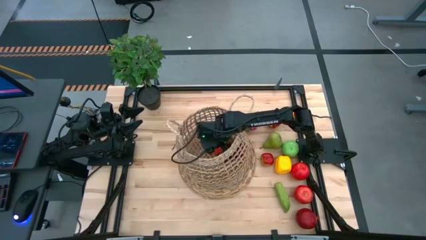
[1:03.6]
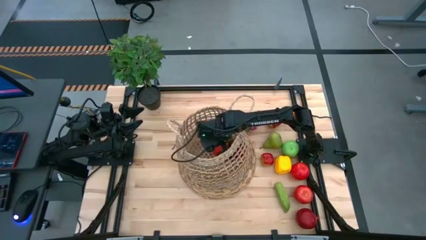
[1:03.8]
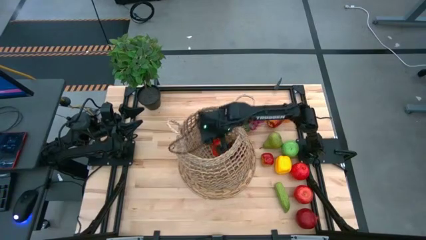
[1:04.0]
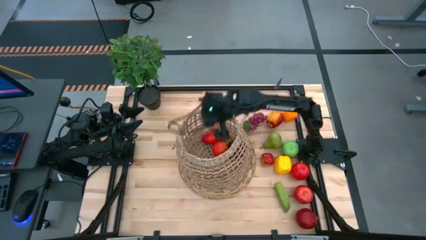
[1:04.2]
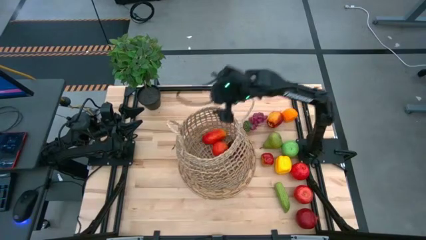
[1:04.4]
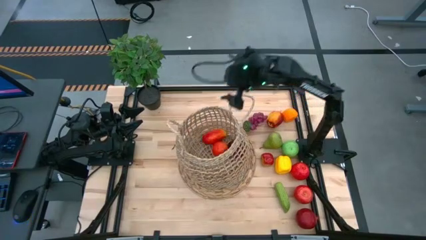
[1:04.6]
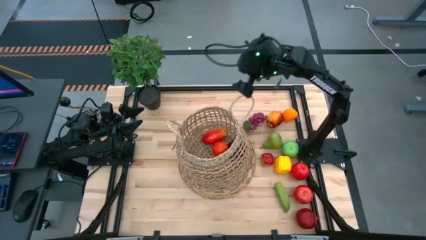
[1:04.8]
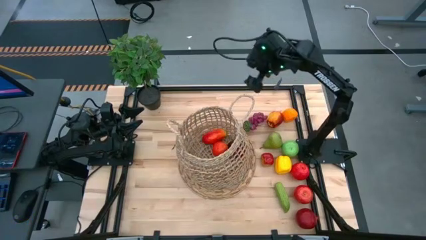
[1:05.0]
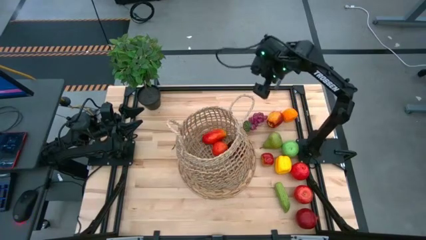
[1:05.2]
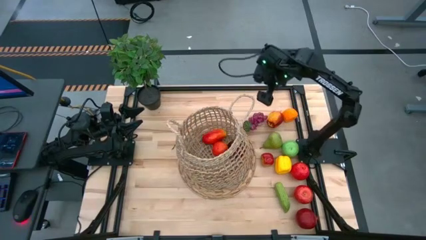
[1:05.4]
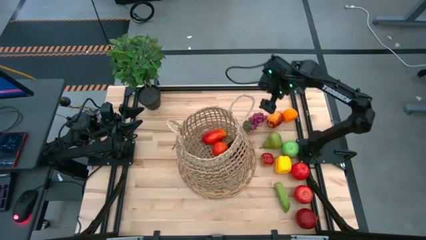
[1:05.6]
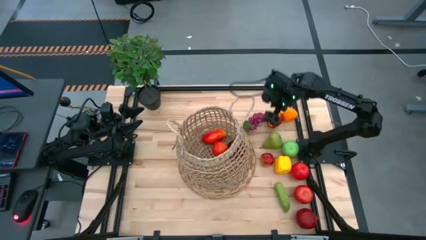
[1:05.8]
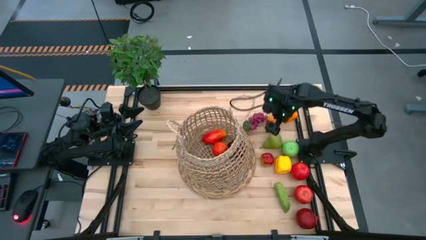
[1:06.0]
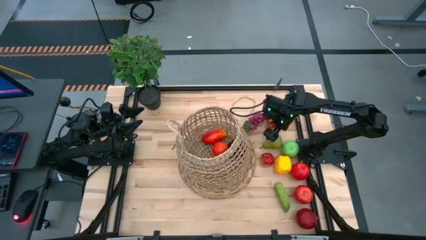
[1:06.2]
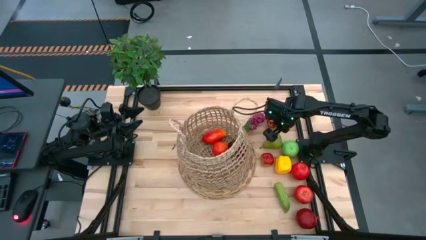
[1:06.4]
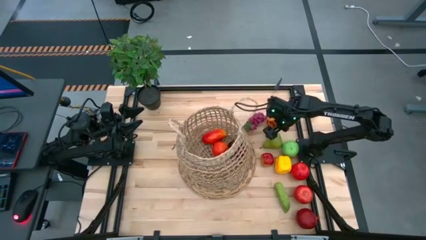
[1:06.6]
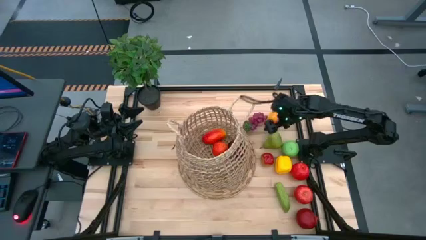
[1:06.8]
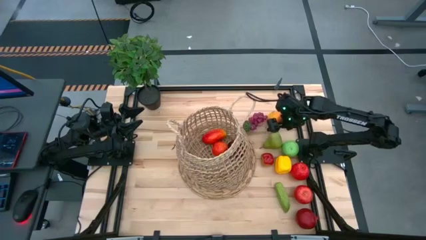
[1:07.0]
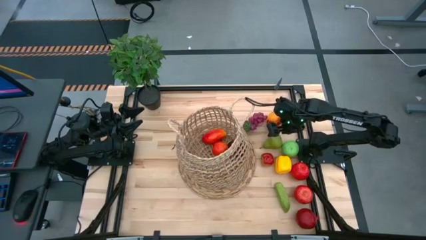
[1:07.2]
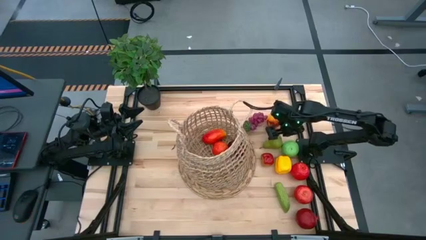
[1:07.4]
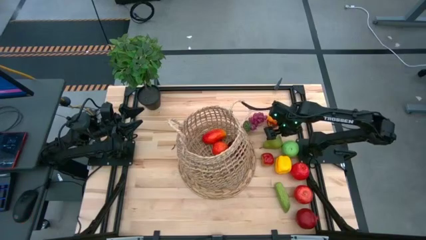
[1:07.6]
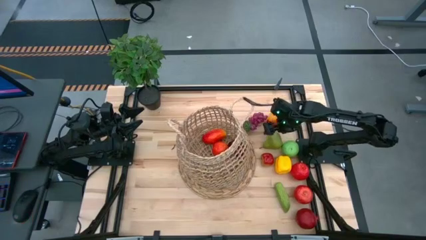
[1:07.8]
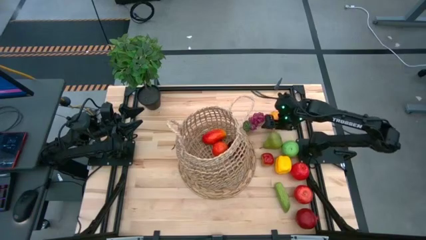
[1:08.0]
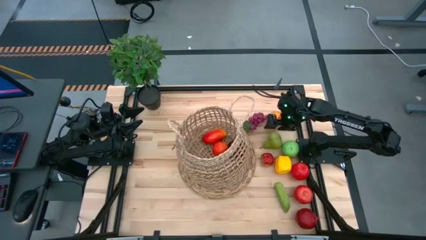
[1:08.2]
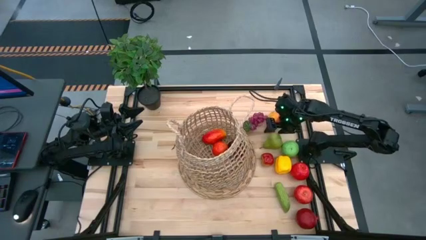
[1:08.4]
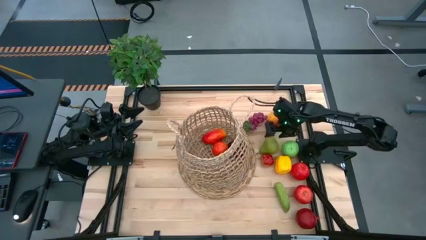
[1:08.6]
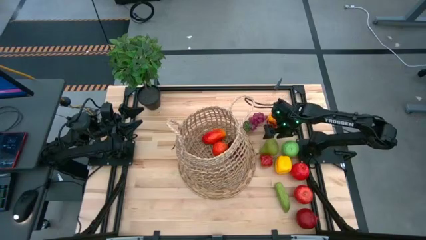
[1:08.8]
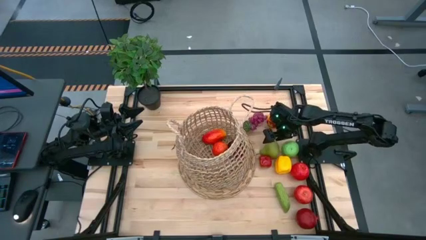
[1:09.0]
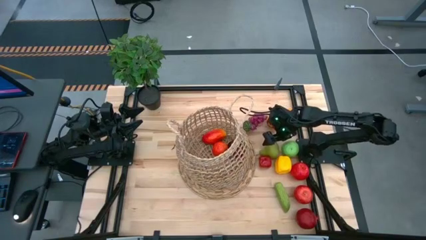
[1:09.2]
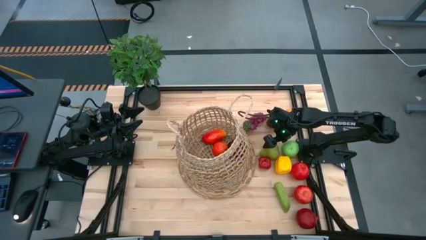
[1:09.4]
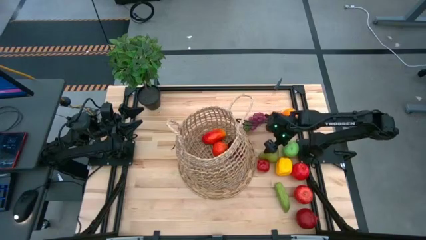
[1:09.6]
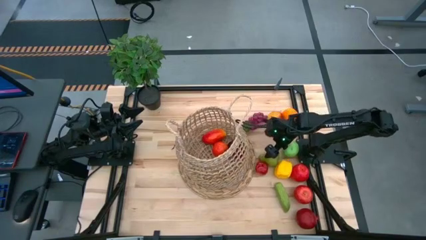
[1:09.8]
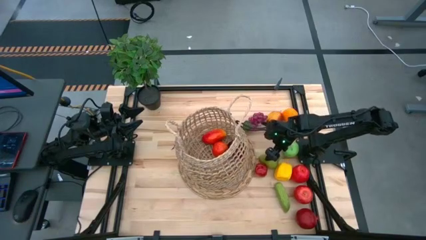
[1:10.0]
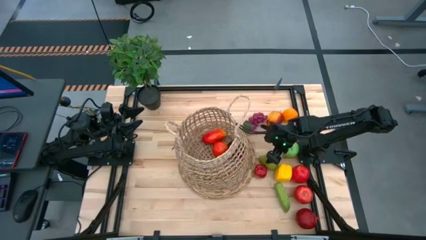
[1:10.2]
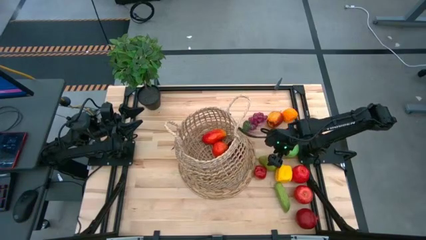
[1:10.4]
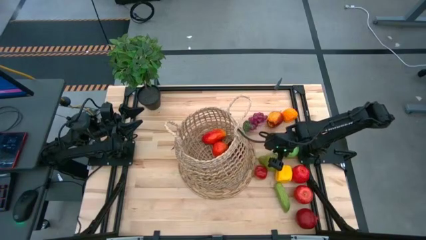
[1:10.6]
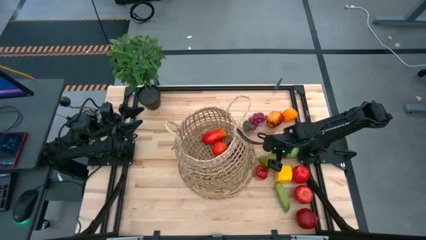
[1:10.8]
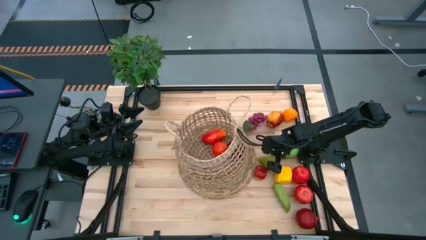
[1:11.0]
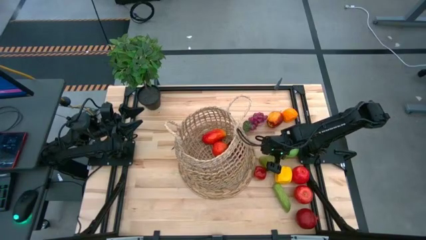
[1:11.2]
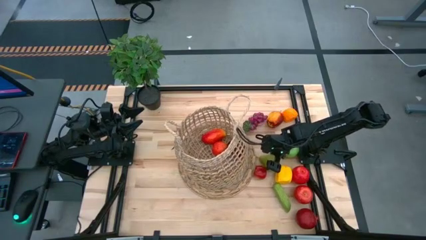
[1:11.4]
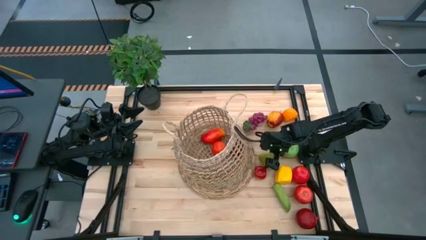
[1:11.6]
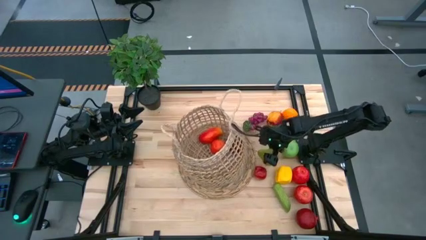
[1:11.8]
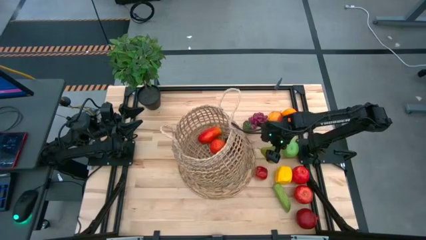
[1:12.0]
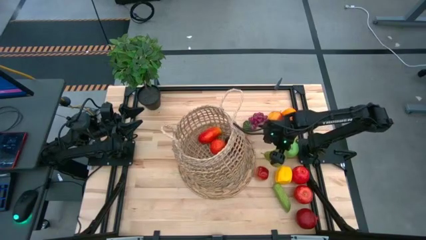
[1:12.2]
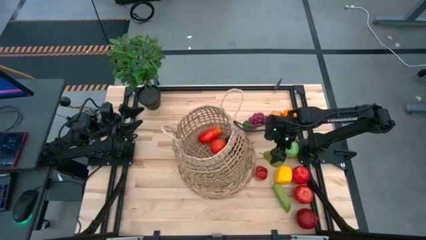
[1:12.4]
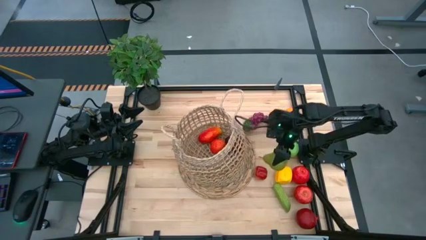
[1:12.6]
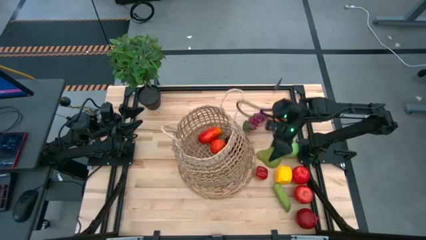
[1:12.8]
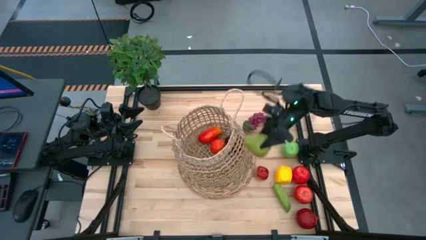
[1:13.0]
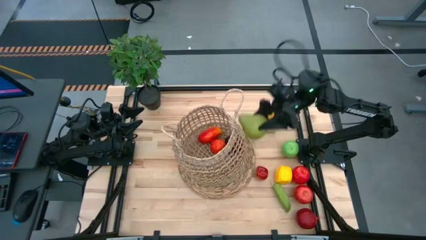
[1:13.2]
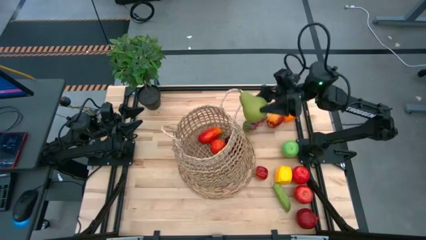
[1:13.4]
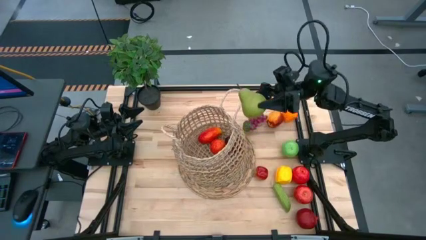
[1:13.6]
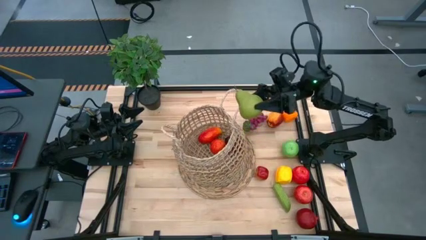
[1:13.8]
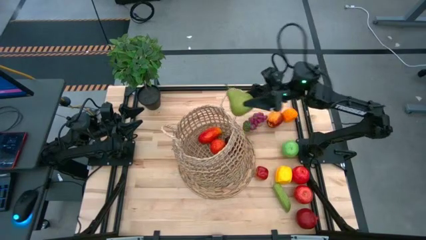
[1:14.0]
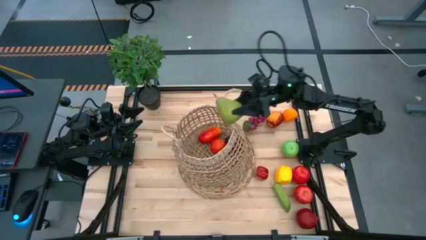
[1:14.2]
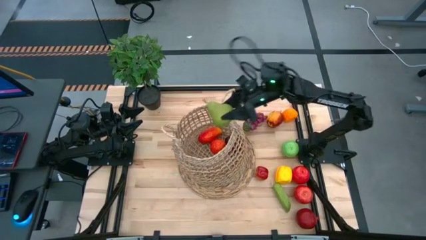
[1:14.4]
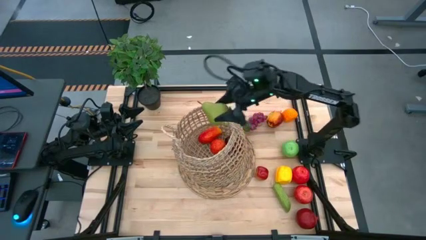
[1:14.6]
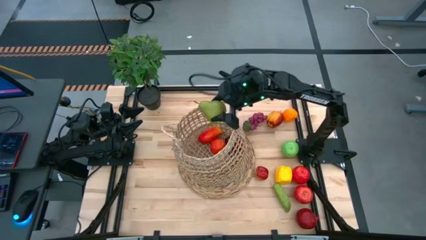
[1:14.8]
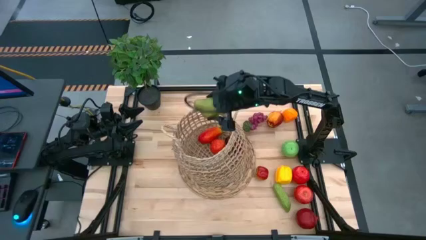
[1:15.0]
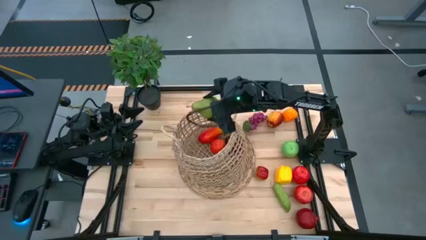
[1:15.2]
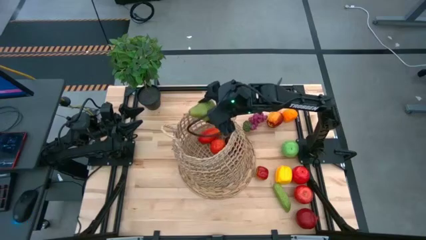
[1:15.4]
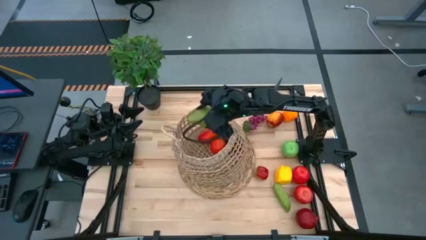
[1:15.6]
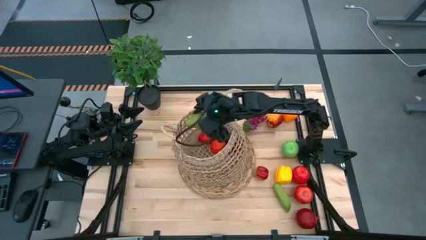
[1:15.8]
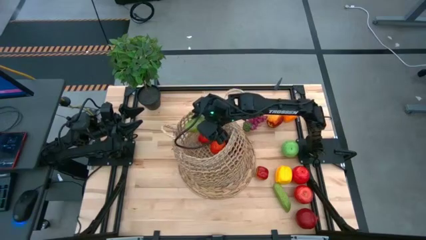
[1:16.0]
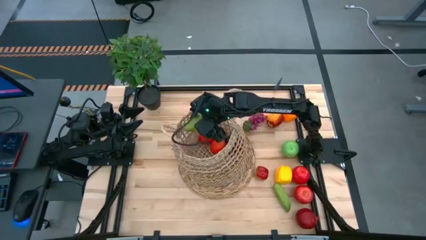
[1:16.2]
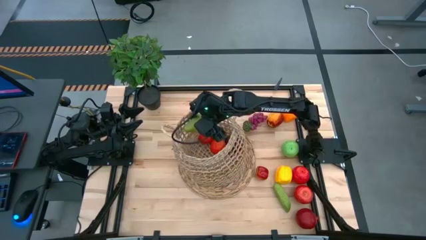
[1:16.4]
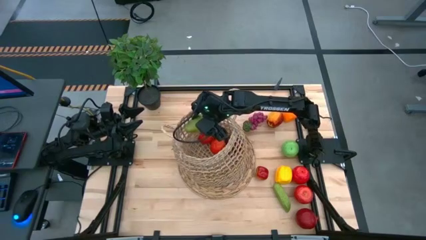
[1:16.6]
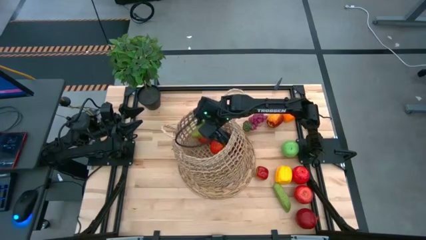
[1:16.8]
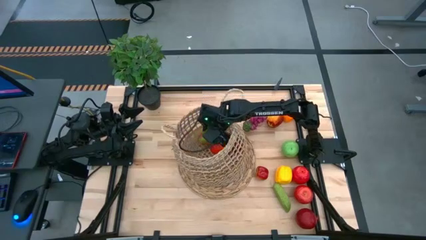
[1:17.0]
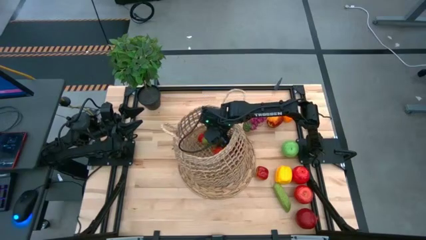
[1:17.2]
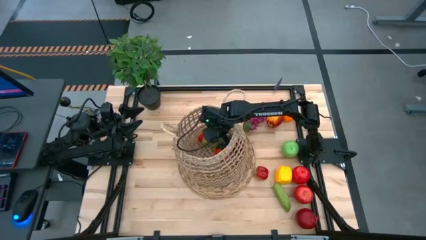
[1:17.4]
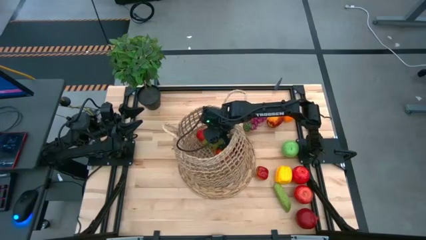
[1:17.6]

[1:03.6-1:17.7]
Task: Build produce basket
Put the green pear into the brown basket

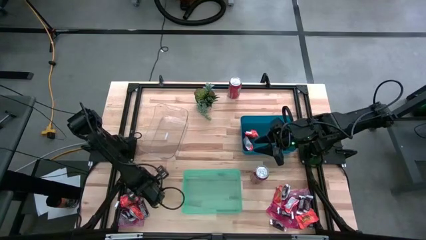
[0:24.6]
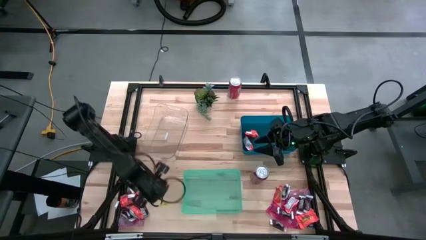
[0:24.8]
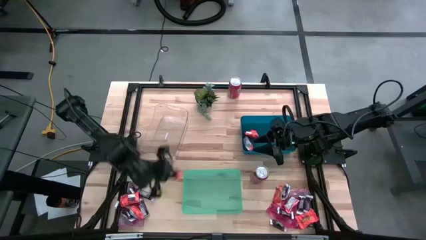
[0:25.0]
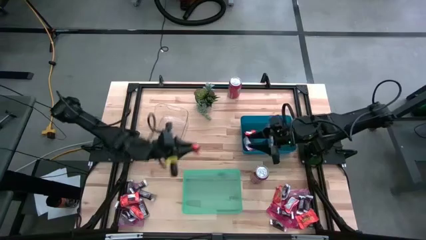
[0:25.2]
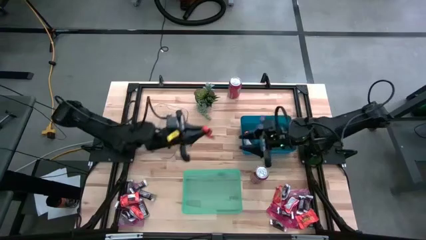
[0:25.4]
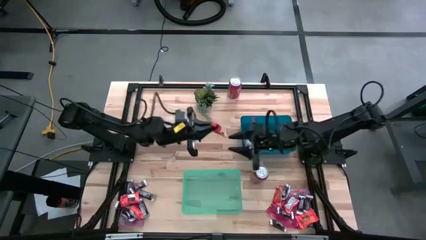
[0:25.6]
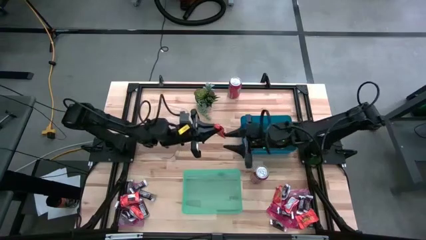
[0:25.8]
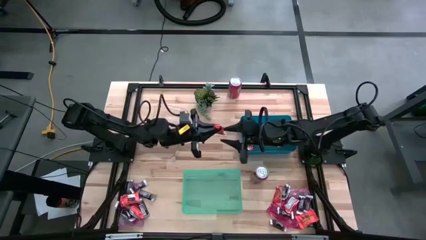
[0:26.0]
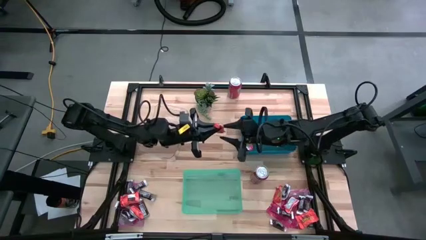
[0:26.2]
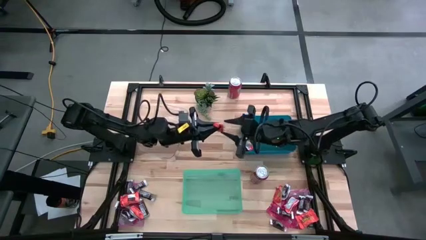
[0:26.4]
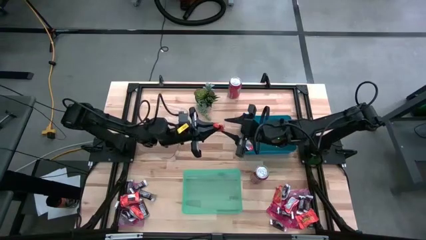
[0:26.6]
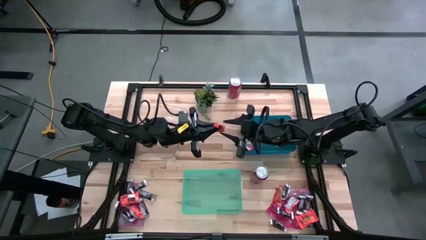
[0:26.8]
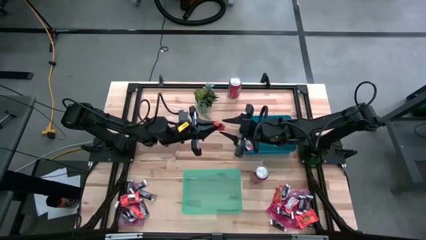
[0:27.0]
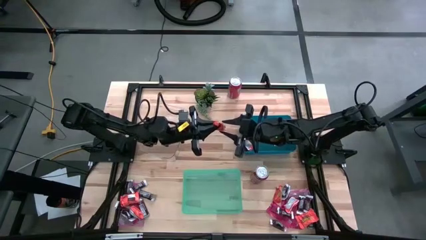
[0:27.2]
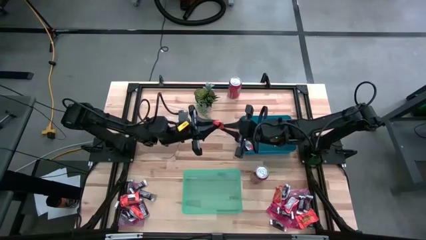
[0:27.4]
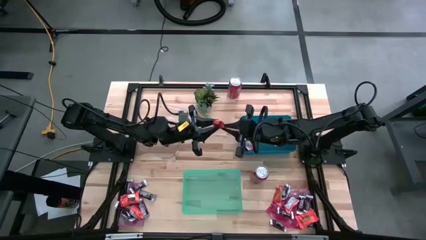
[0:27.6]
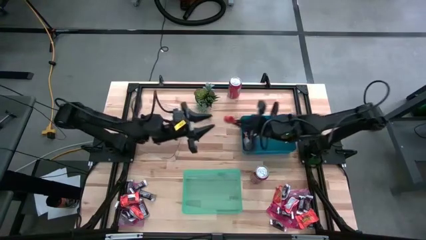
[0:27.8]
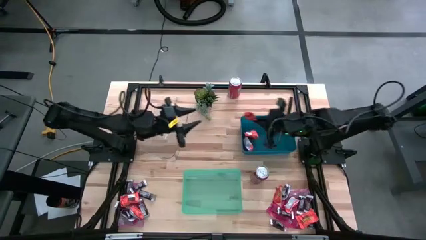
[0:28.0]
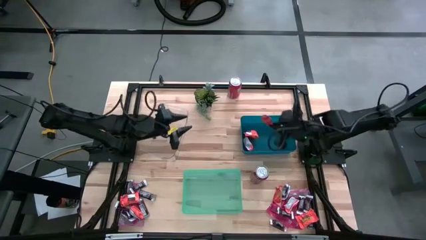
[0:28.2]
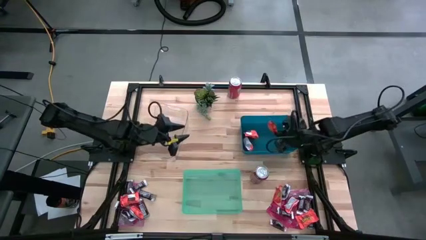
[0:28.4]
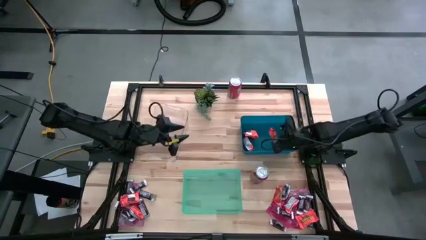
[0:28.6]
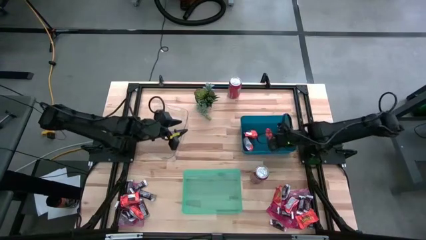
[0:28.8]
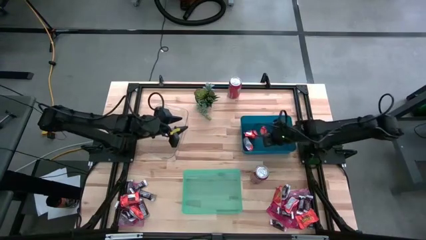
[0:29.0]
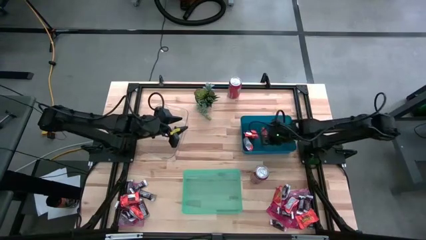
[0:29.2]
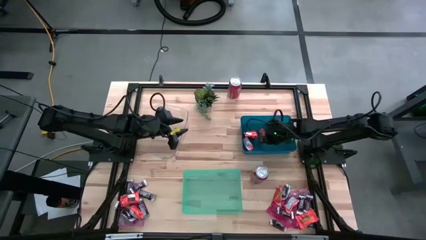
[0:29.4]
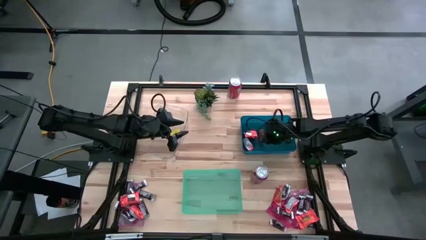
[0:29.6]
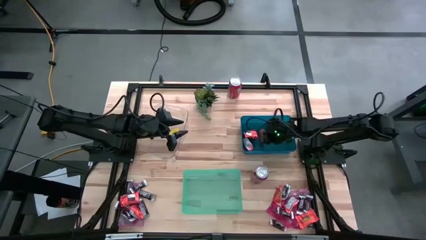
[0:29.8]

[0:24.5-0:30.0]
Task: Sort candy
Put the orange chocolate into the blue bin
